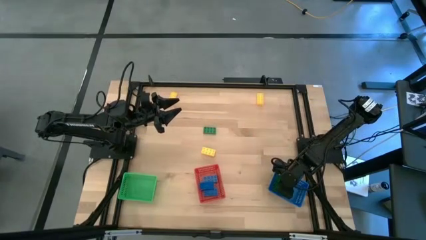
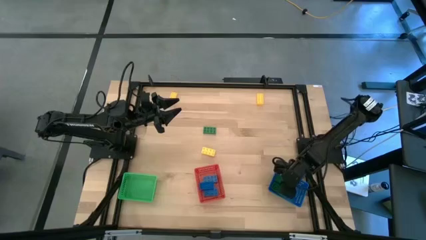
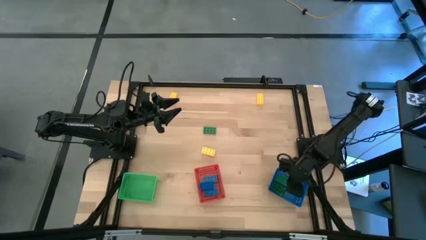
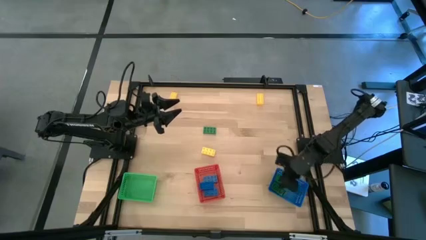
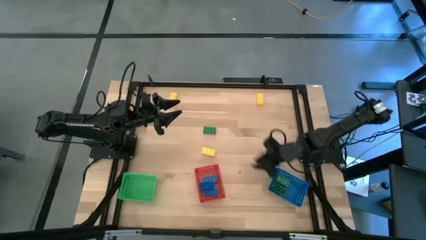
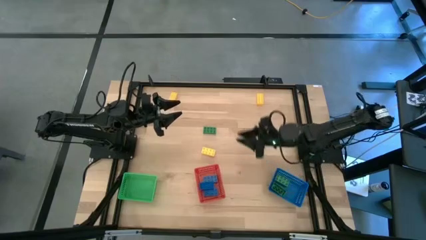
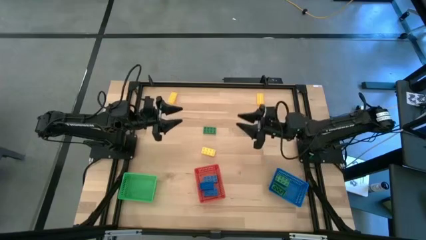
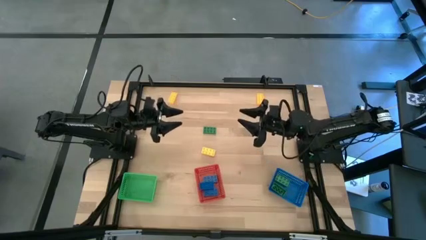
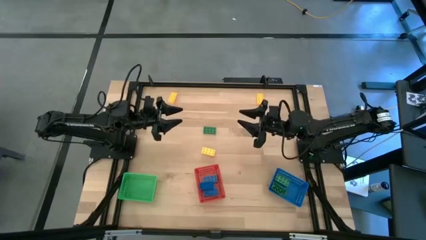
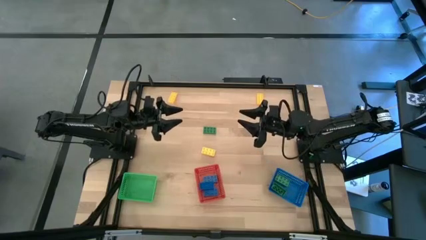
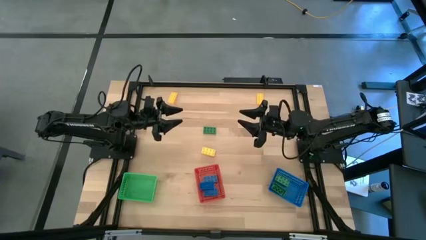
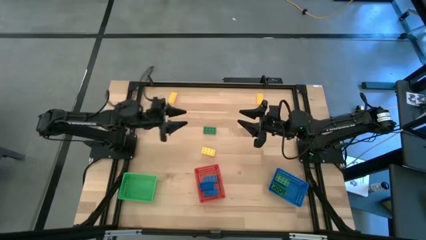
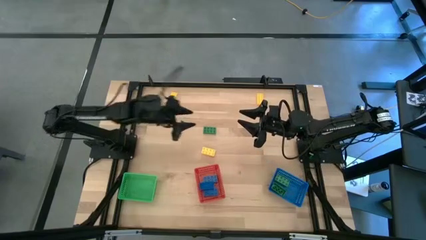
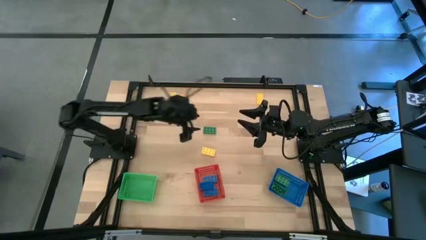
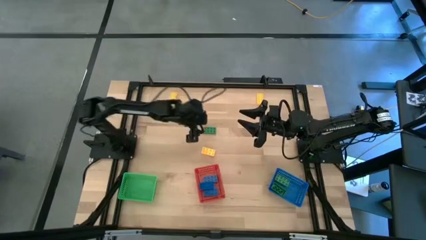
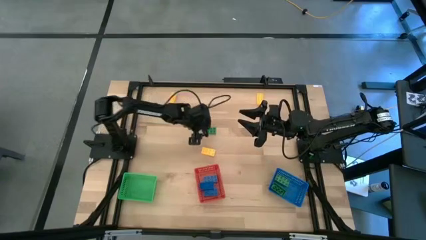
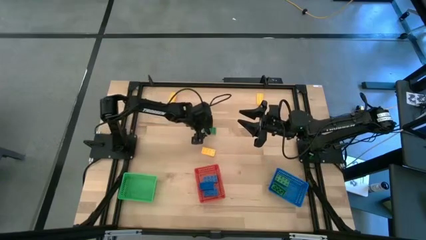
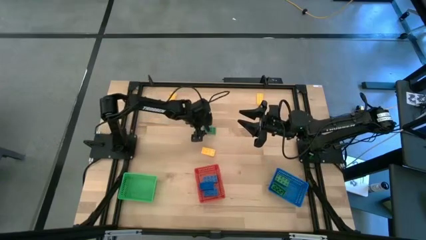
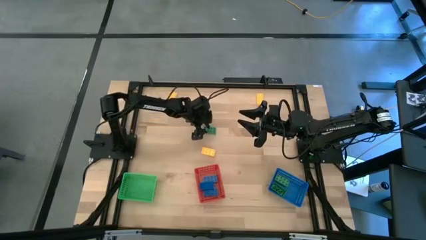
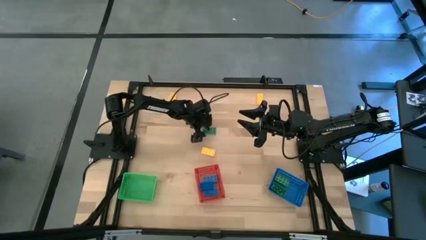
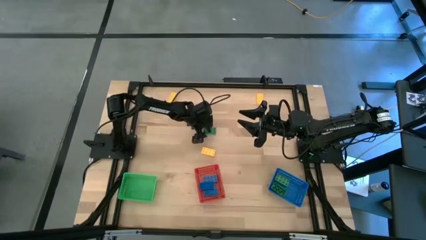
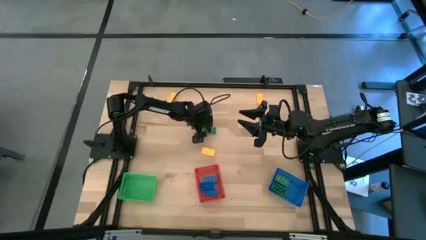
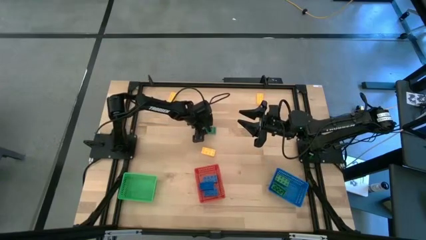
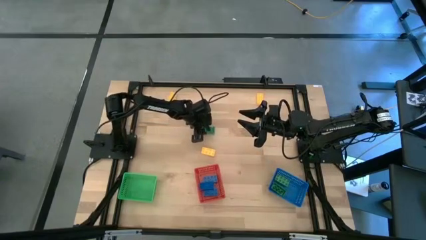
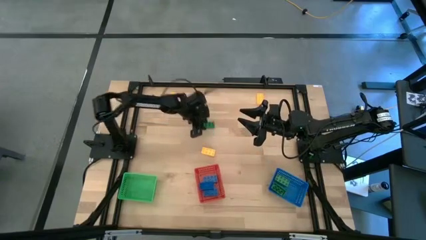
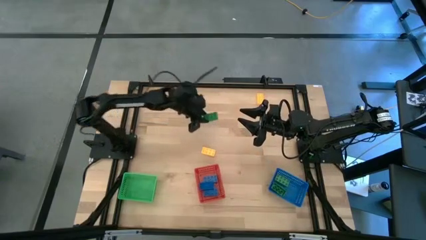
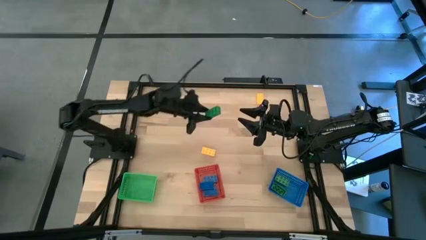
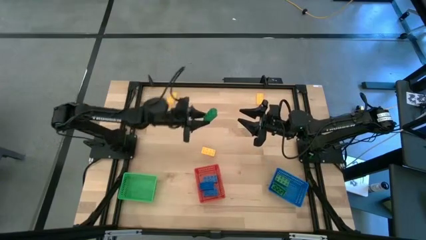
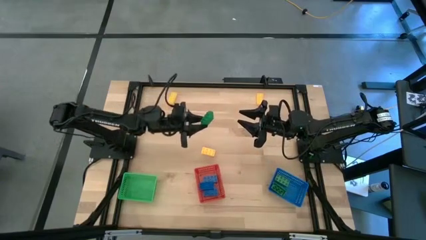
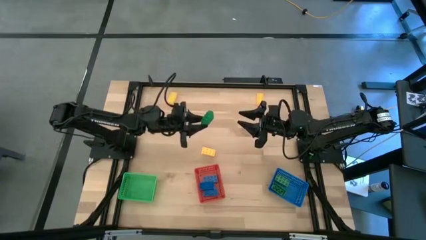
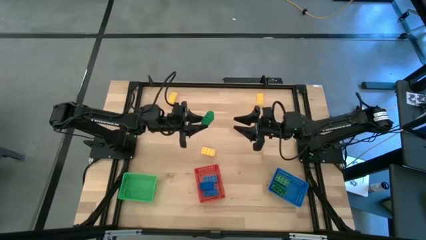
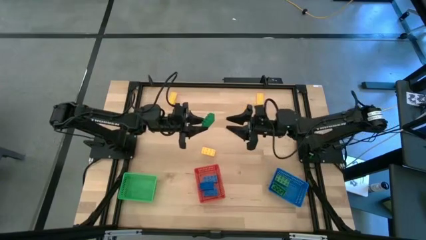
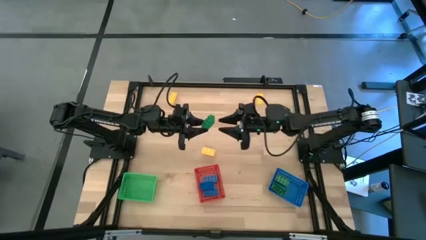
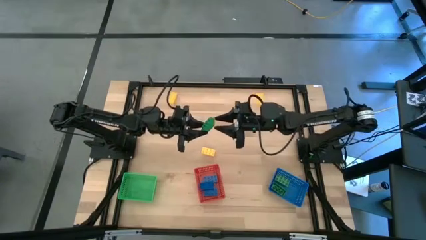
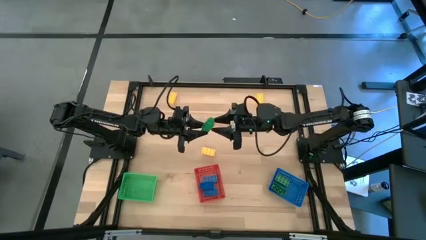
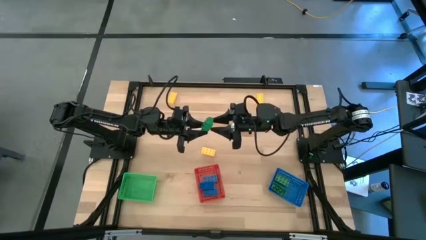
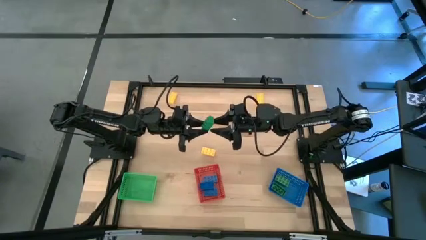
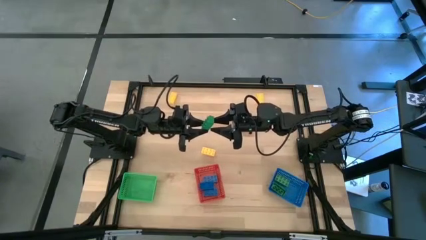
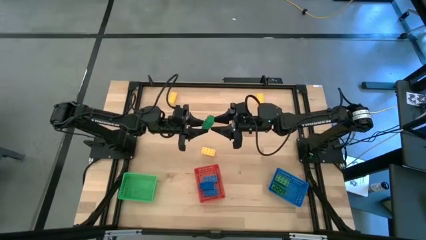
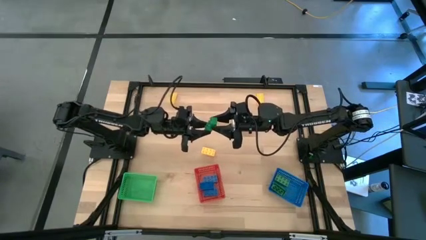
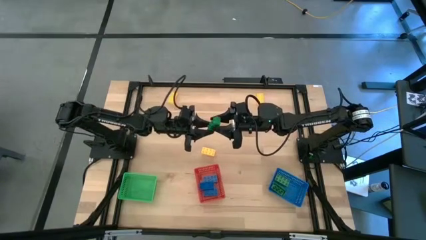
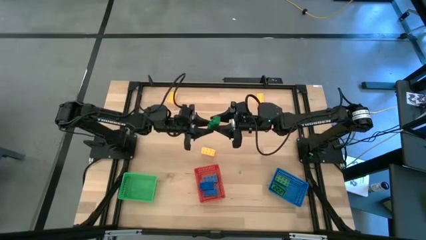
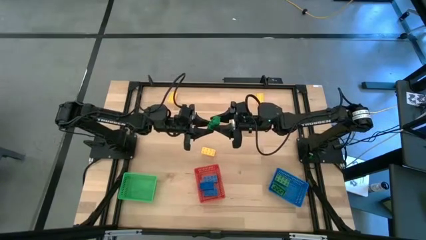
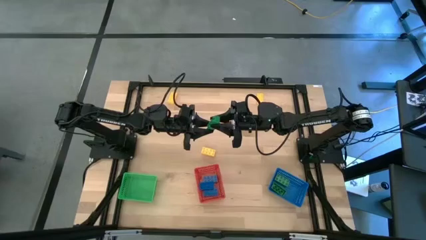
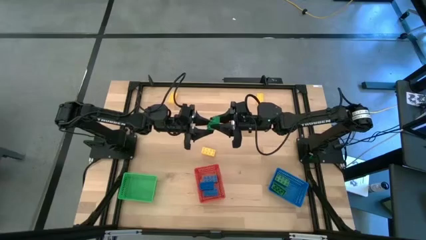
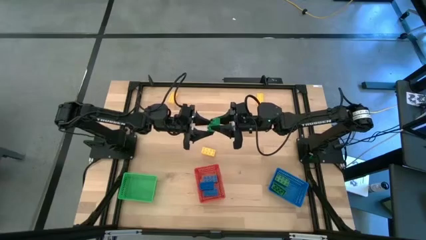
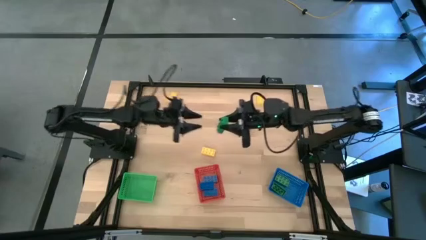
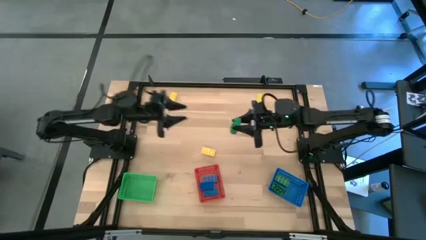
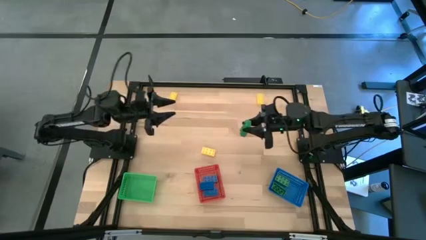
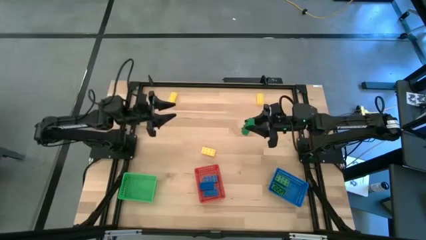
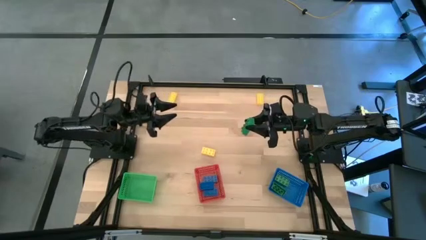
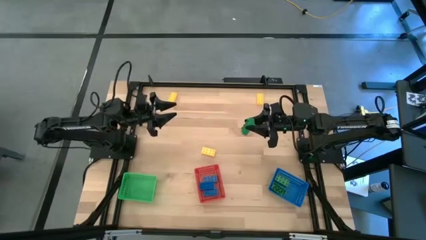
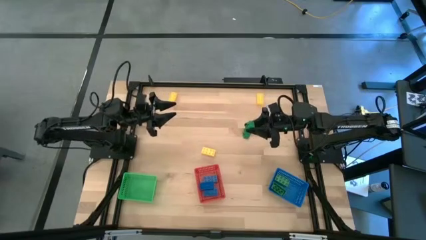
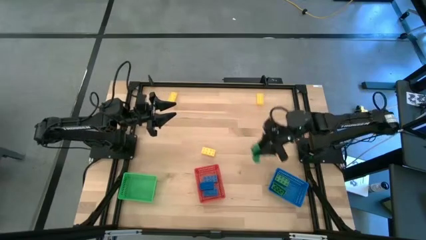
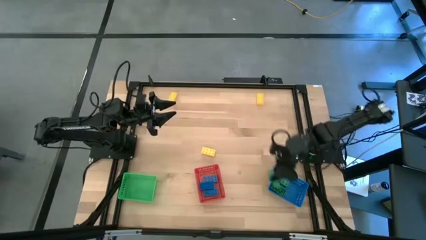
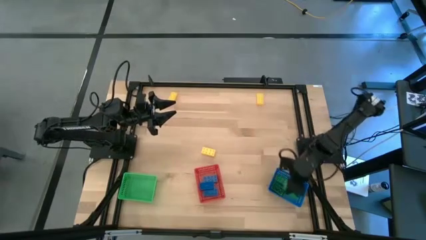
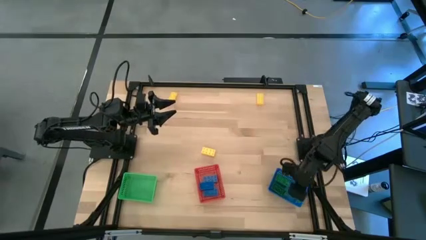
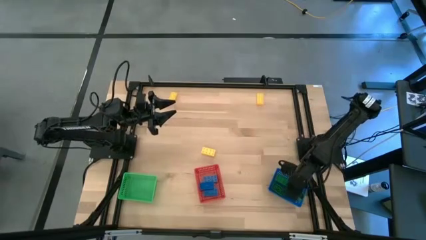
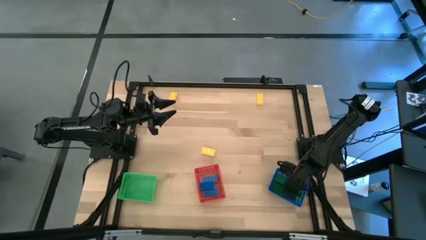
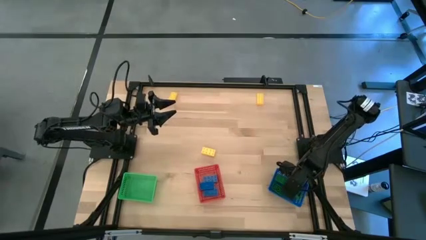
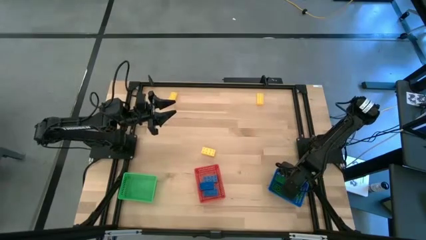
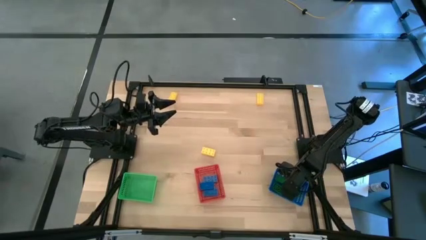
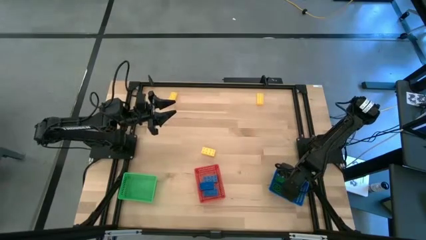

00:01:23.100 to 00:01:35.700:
Task: Sort & place blocks by color
Put the green game piece into the blue bin
